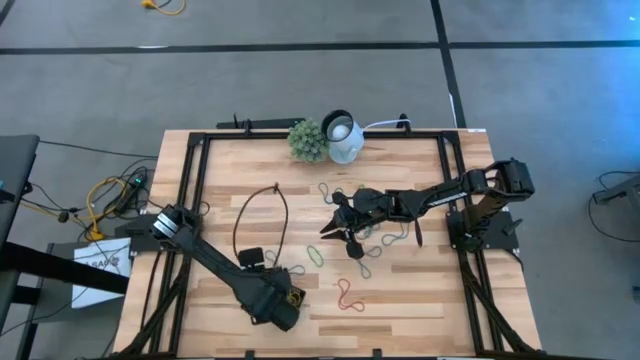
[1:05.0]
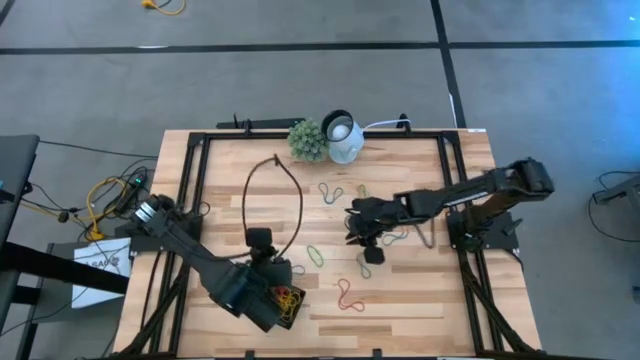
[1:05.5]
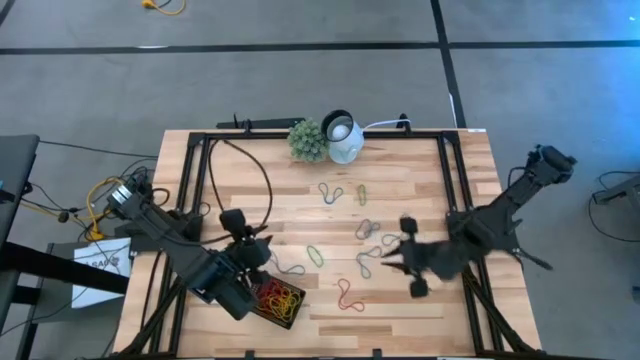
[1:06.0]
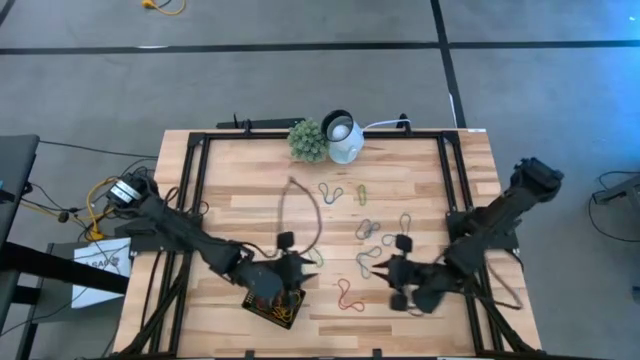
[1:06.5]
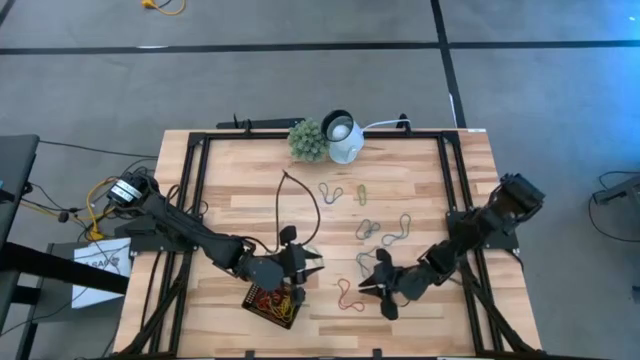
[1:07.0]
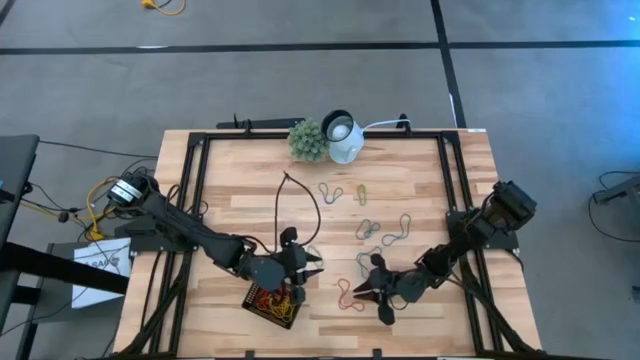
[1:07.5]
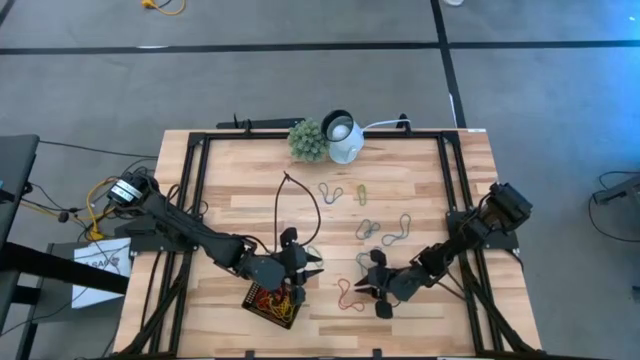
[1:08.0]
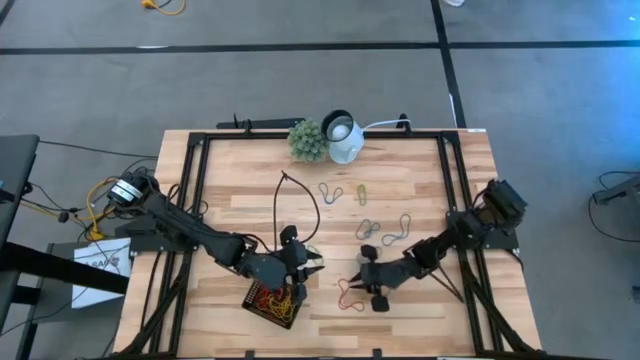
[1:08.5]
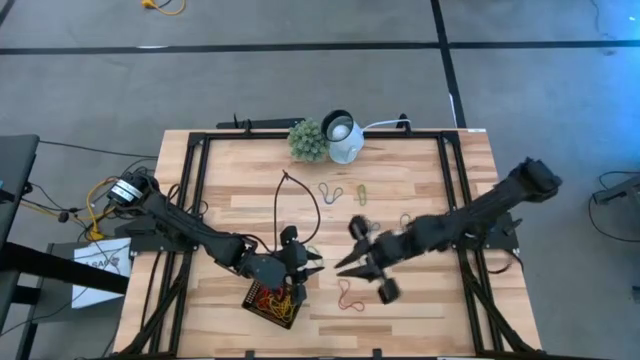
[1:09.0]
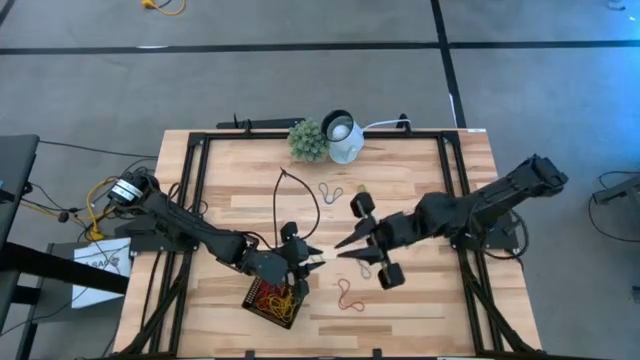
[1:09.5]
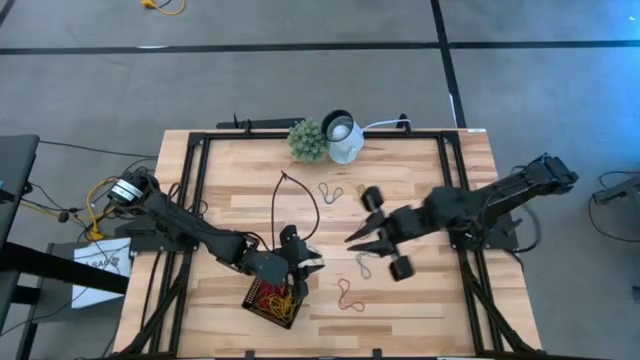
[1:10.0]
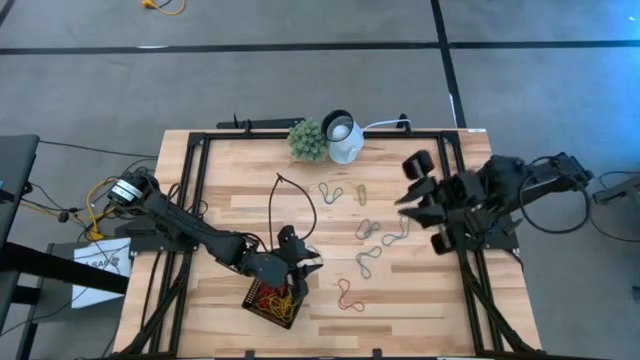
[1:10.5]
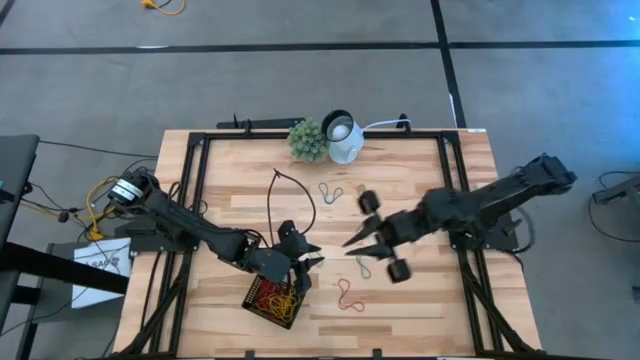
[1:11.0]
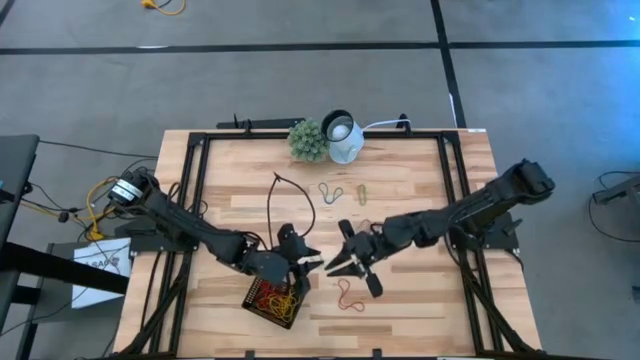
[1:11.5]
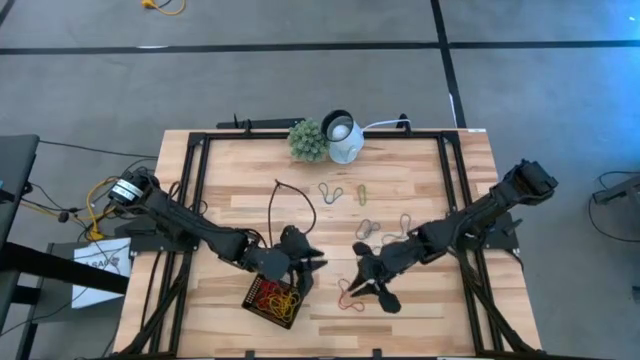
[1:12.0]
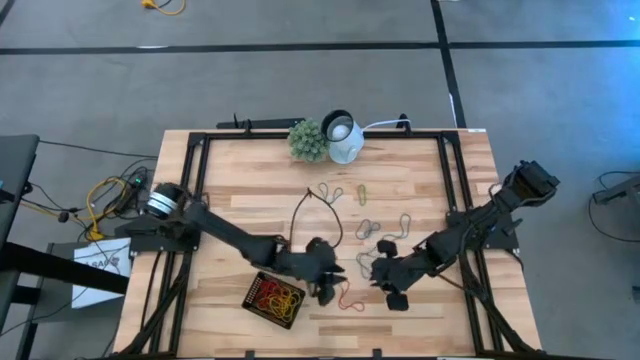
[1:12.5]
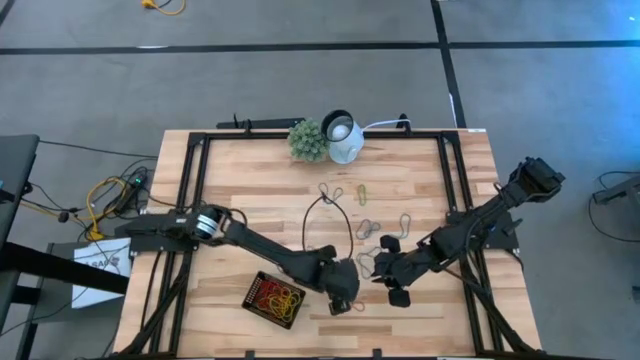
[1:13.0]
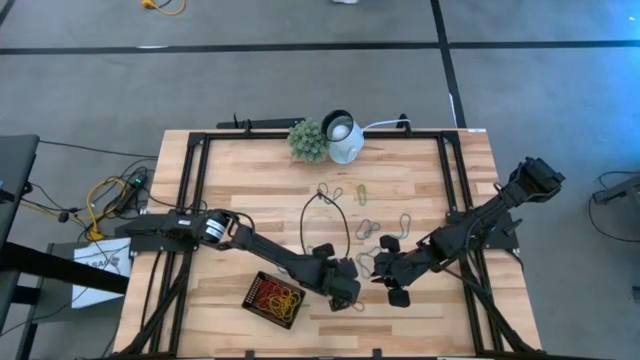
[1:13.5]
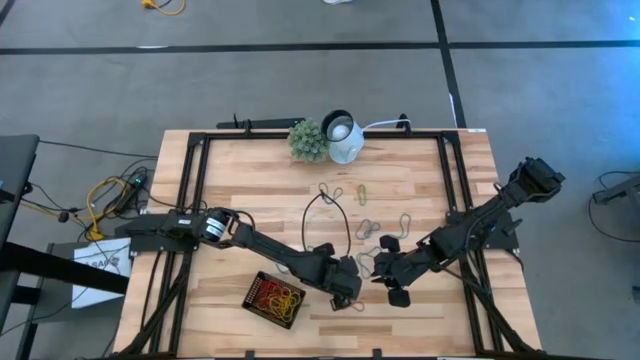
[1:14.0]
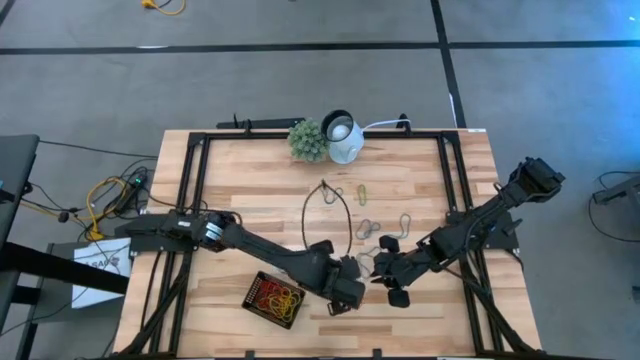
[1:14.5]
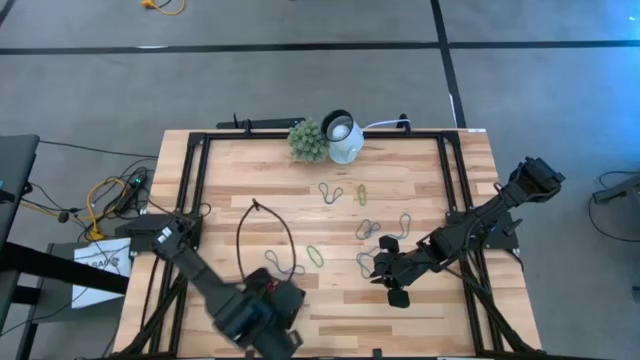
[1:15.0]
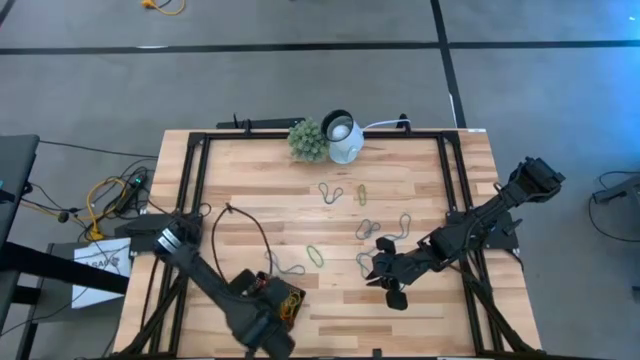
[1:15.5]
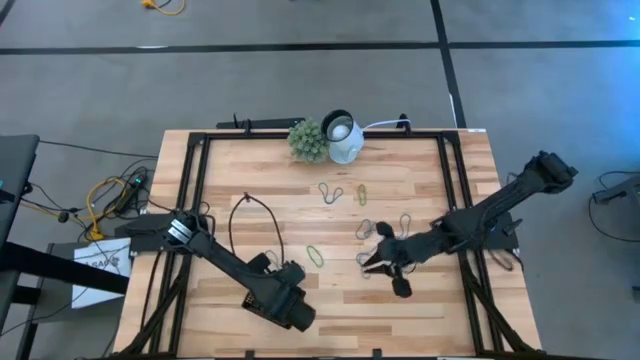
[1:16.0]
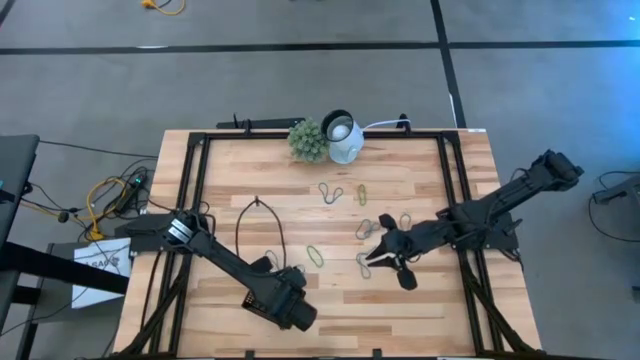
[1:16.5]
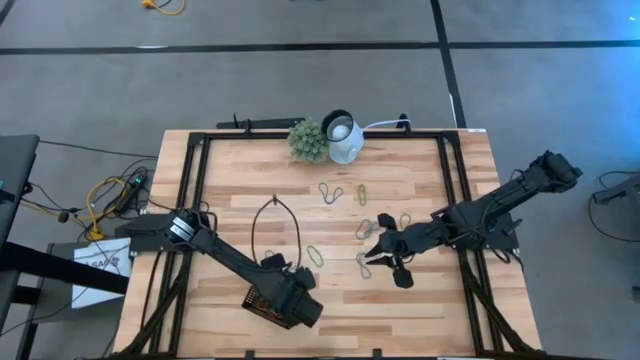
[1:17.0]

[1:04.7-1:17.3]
Task: Pick and place items into bin
Put the red rubber band into the black bin

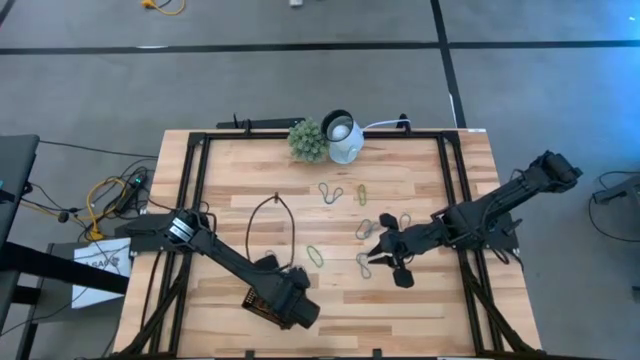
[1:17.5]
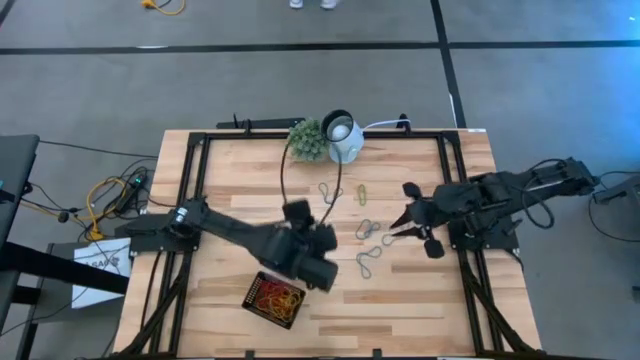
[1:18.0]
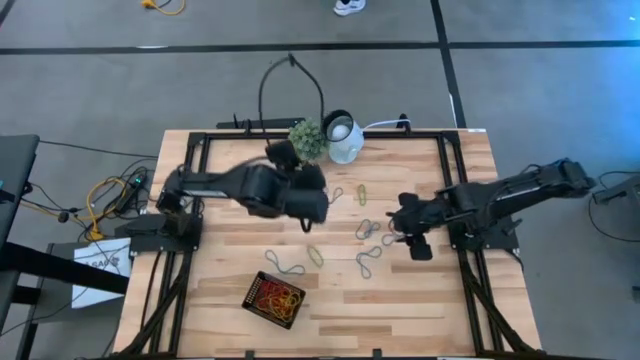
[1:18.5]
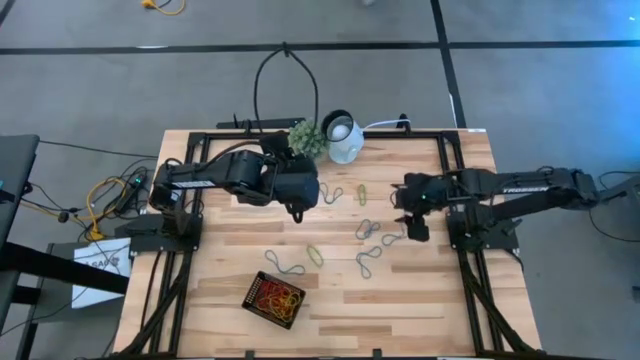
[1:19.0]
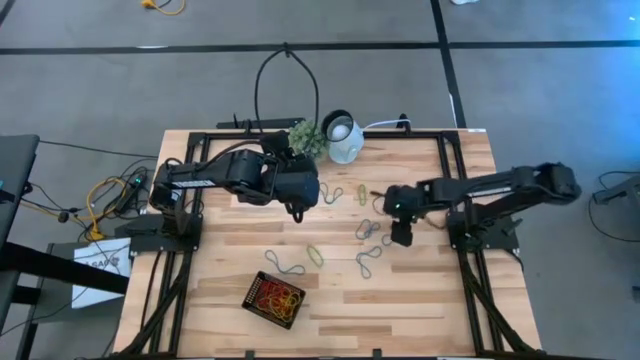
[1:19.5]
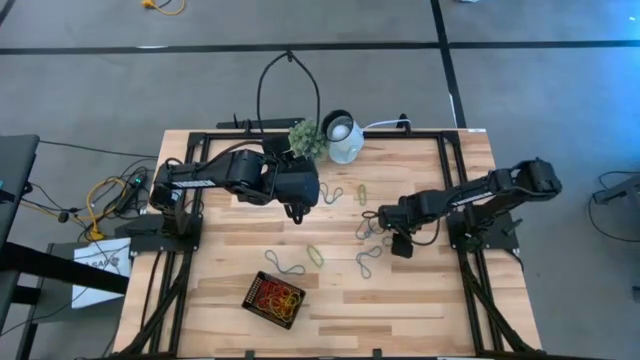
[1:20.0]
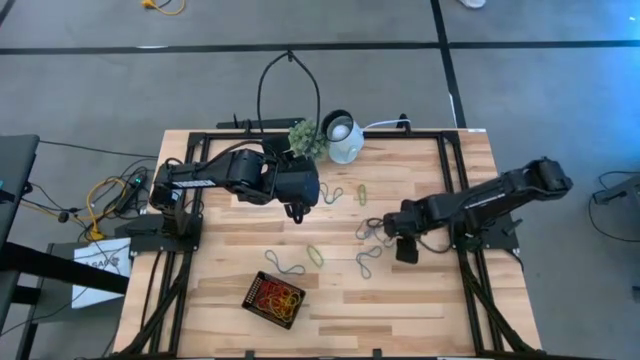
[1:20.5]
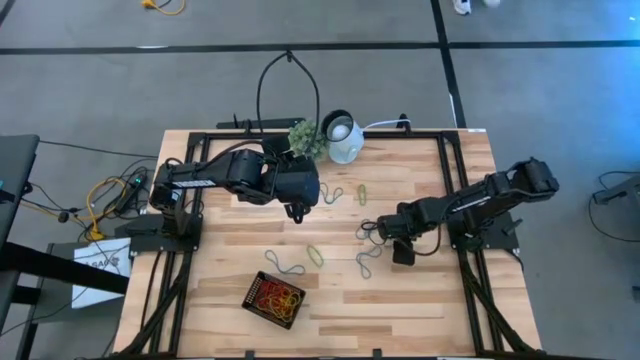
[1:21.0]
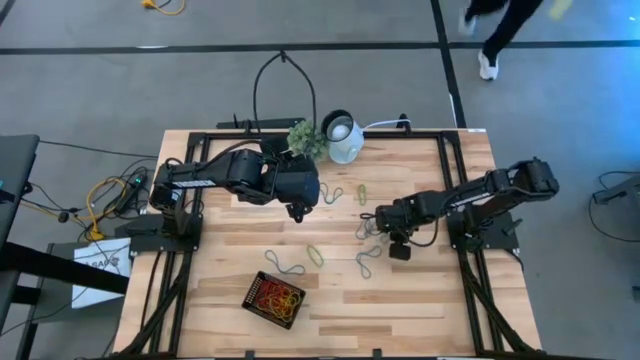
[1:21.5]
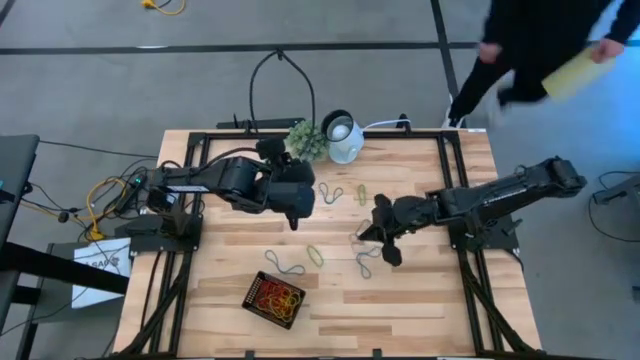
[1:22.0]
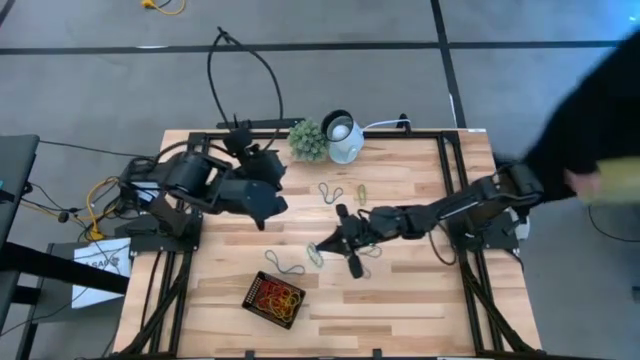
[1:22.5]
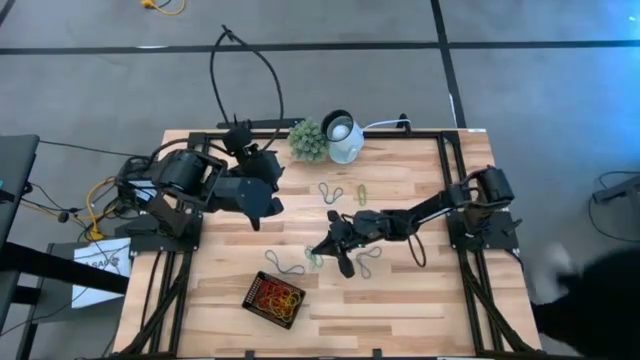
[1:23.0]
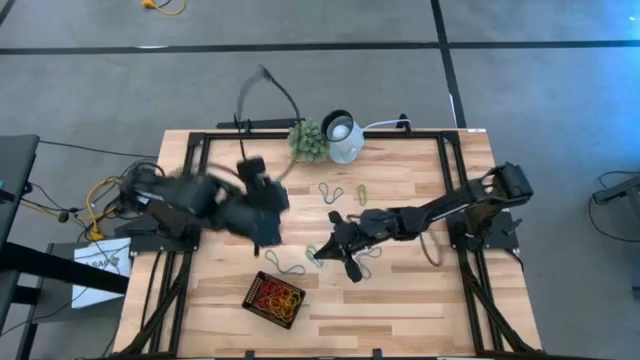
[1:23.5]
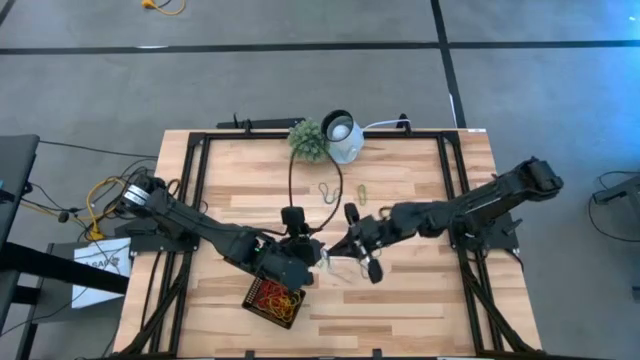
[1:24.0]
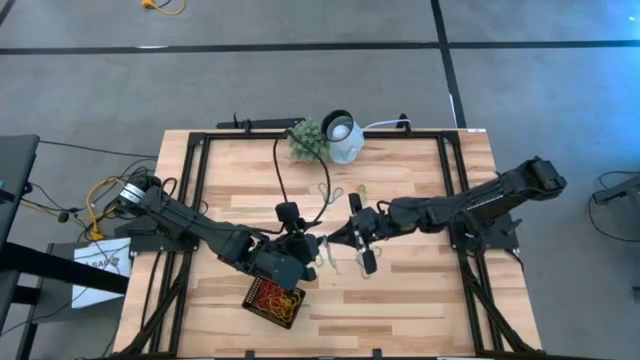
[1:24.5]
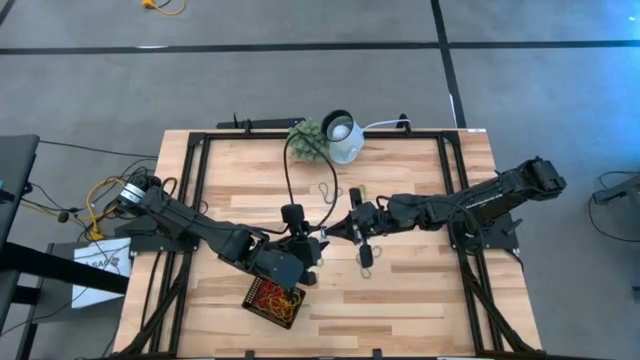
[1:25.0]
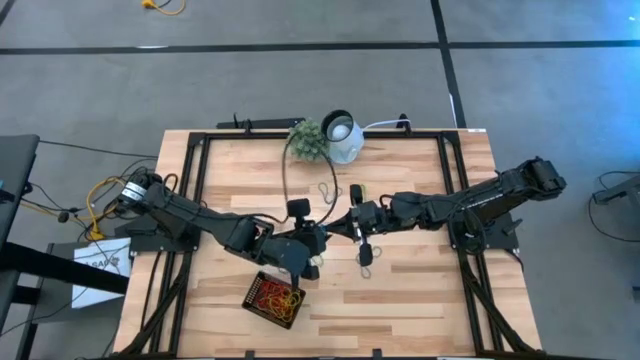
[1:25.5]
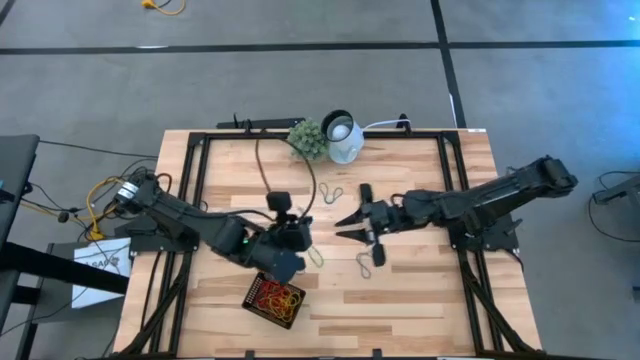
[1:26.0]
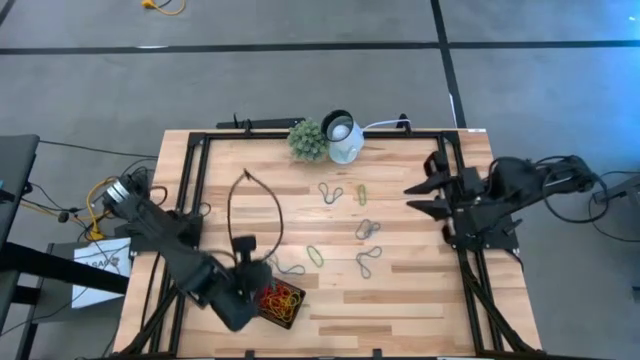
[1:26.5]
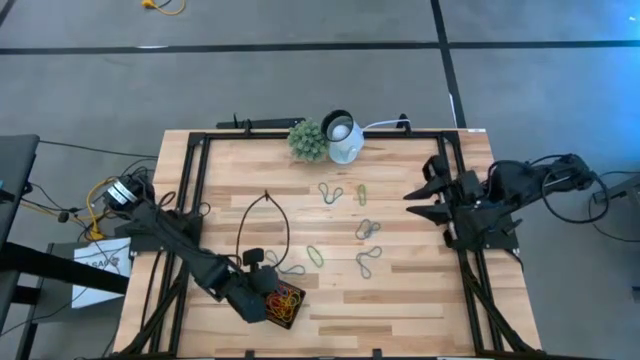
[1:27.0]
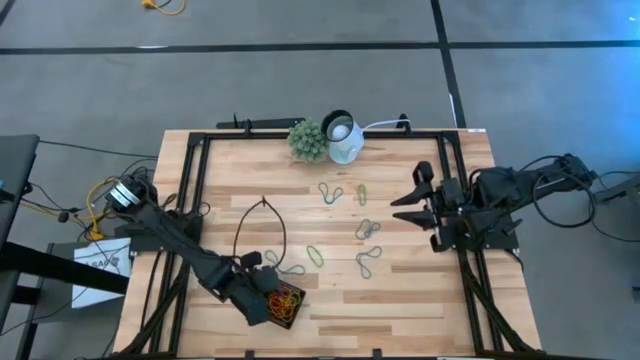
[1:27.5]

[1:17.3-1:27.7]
Put the blue rubber band into the black bin
